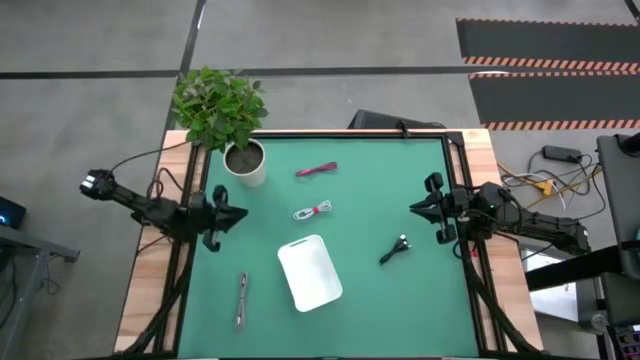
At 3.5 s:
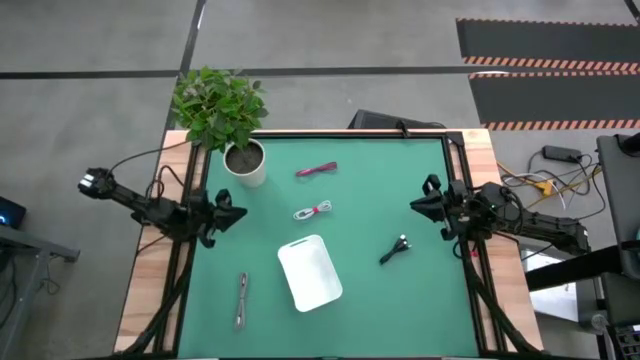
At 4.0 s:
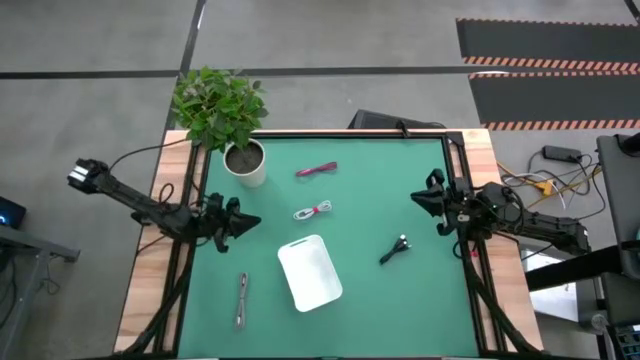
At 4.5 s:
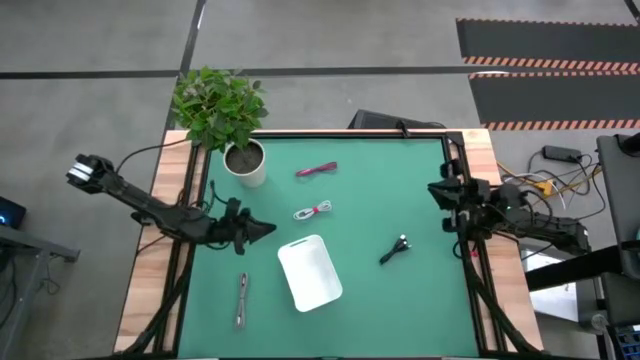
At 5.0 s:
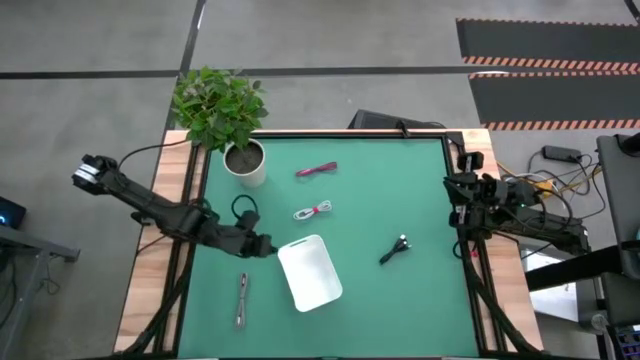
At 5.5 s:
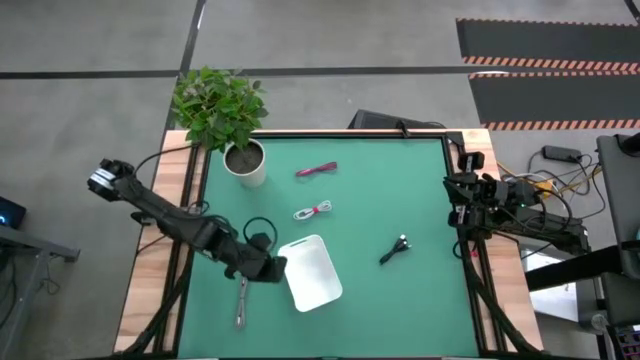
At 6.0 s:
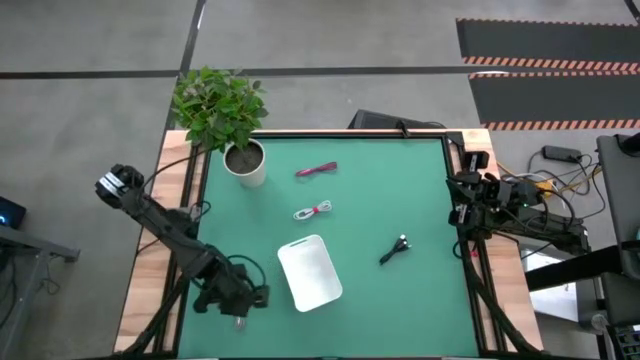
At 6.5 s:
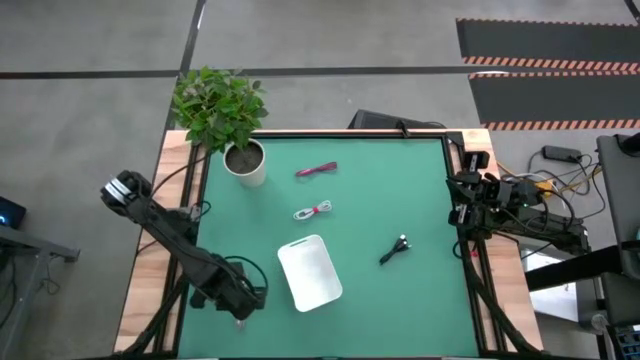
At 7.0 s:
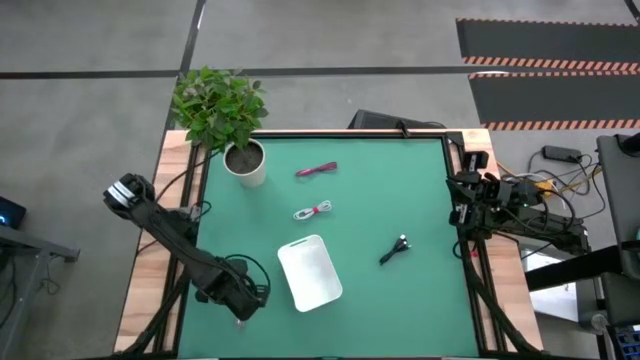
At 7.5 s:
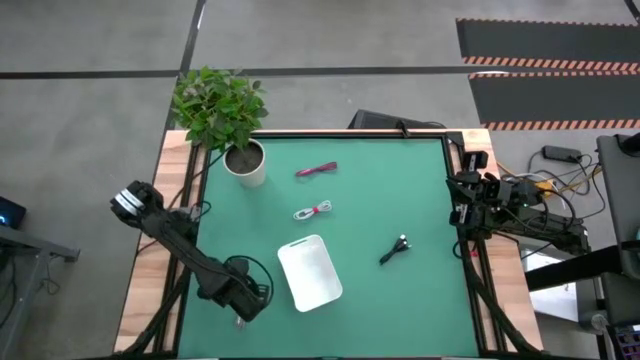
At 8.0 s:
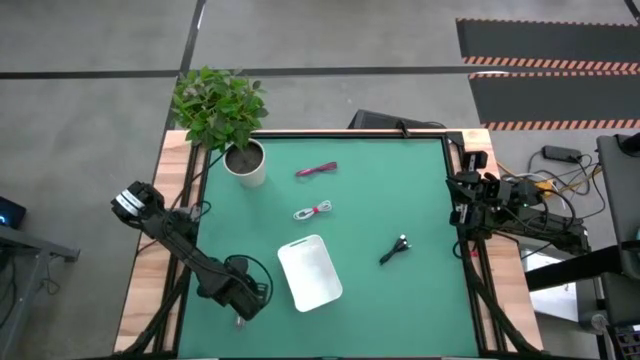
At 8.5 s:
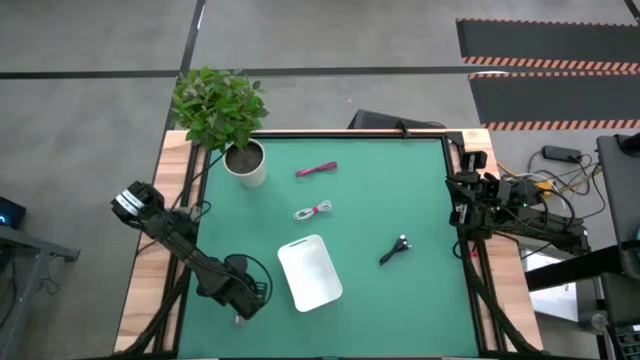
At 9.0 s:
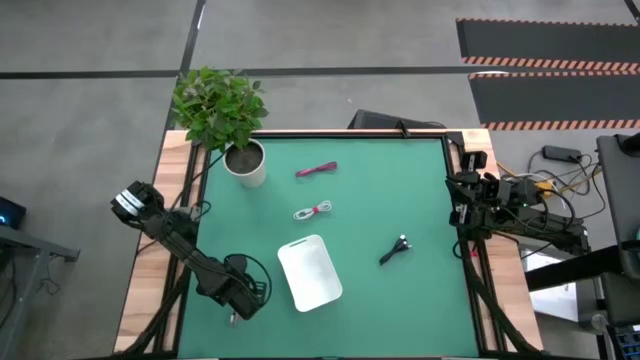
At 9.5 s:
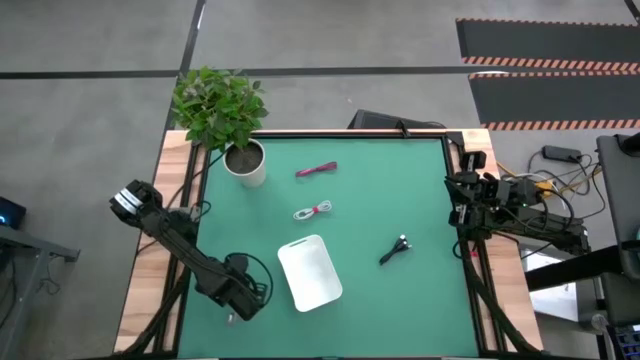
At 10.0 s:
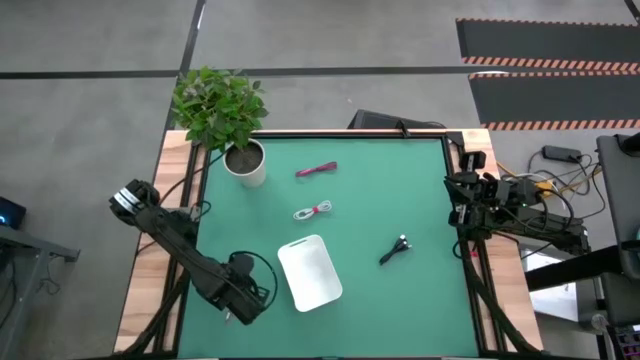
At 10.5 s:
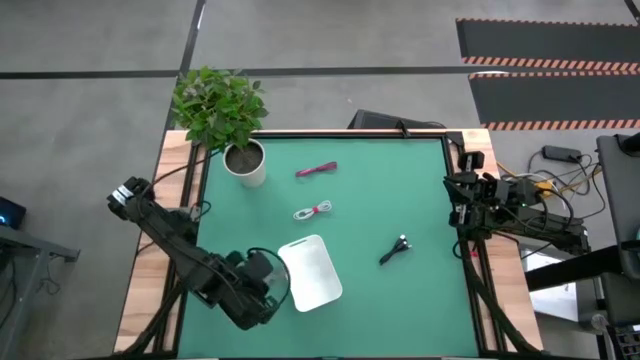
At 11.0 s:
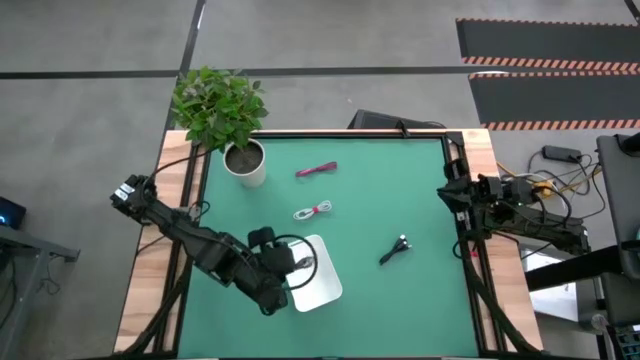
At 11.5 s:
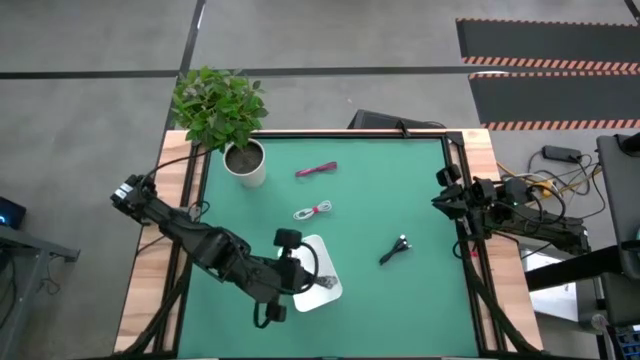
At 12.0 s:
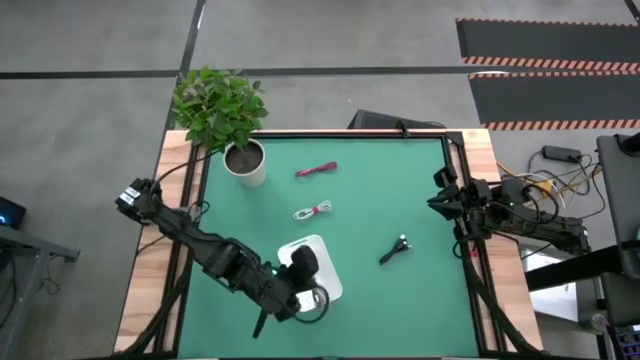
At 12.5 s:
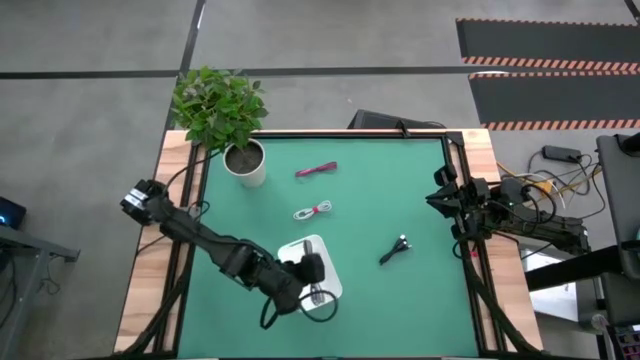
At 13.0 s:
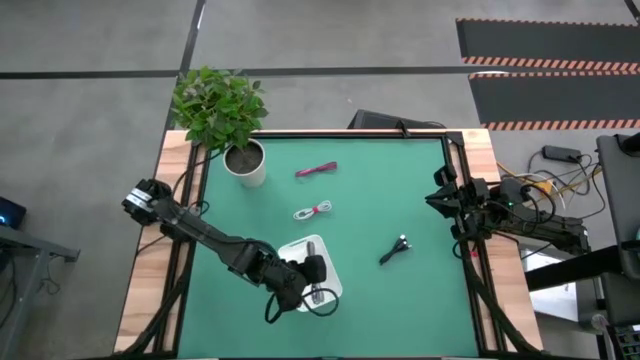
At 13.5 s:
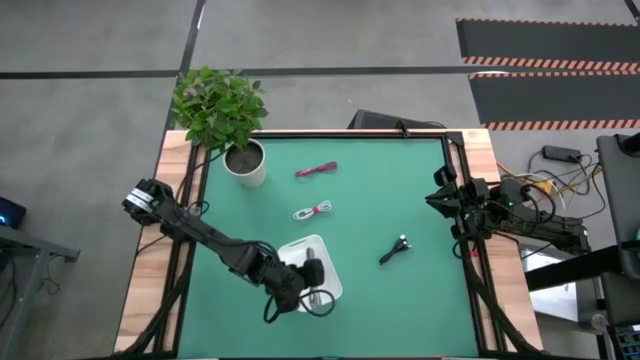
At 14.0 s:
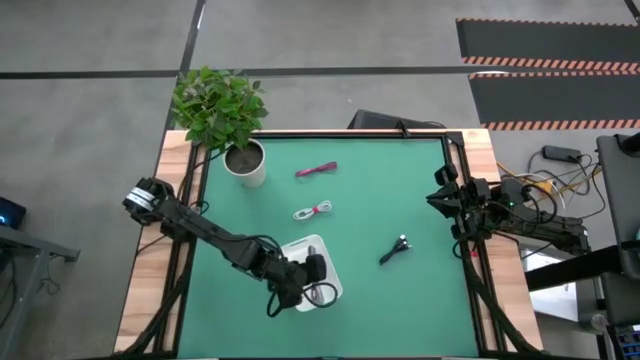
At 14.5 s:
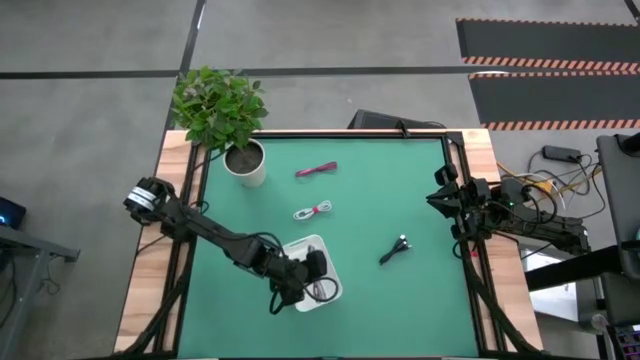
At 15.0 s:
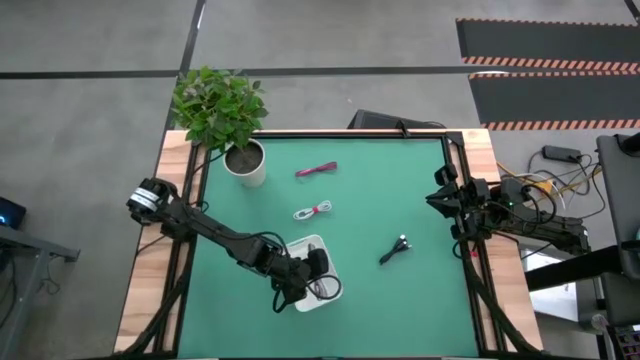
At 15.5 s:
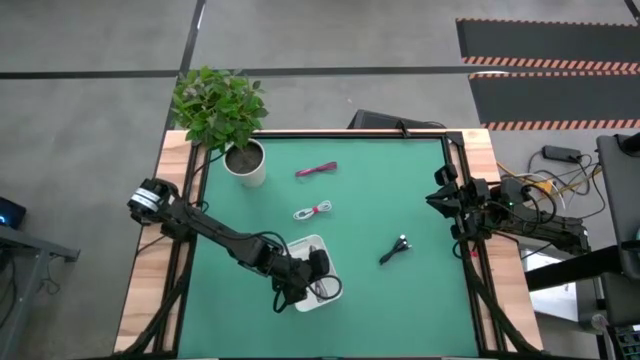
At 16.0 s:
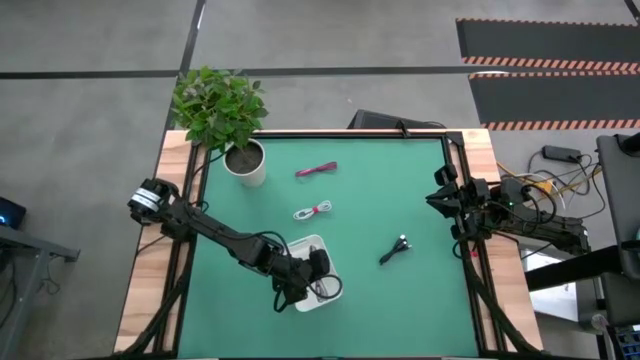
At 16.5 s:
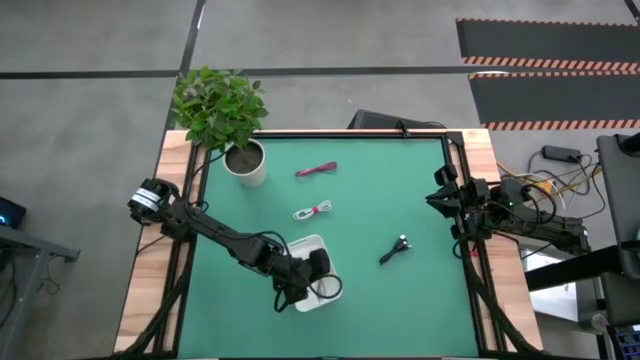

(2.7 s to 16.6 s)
Task: Pick and place USB-C Cables
Put the white and black charger cable into the white bin
